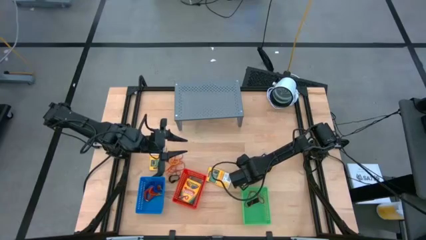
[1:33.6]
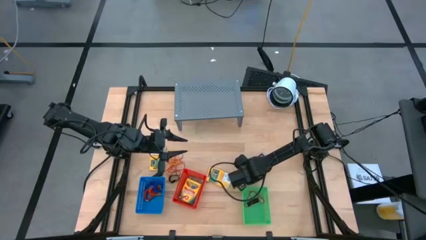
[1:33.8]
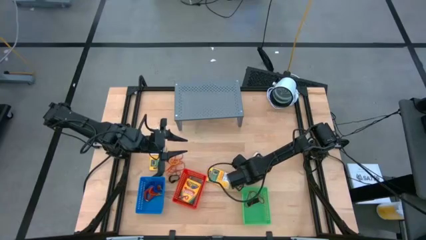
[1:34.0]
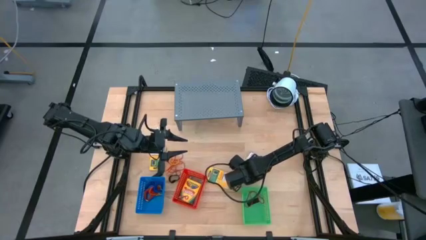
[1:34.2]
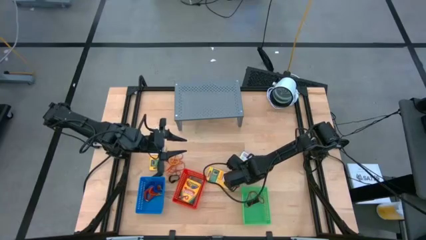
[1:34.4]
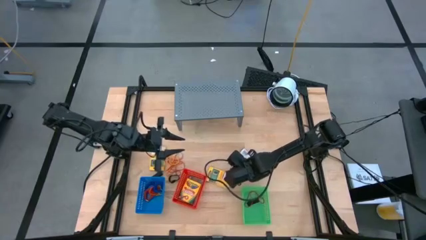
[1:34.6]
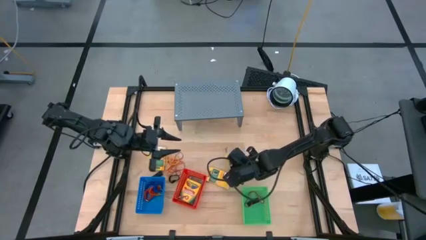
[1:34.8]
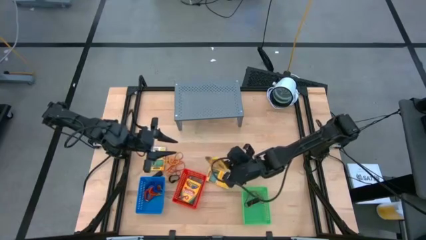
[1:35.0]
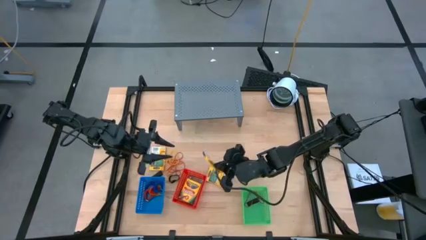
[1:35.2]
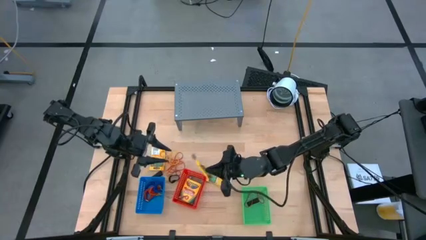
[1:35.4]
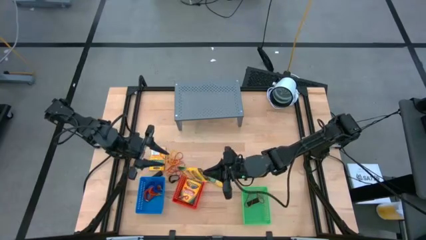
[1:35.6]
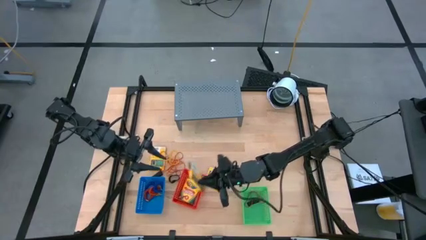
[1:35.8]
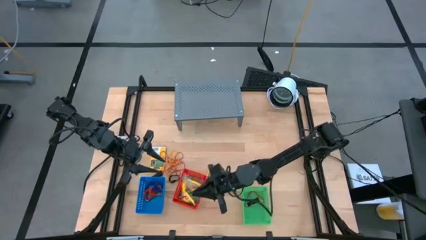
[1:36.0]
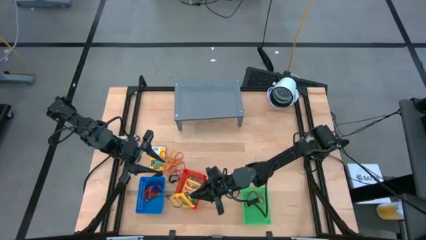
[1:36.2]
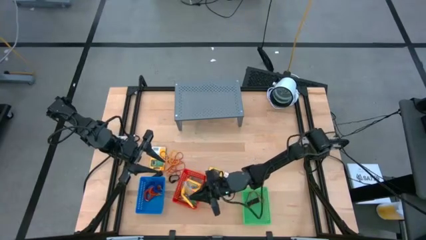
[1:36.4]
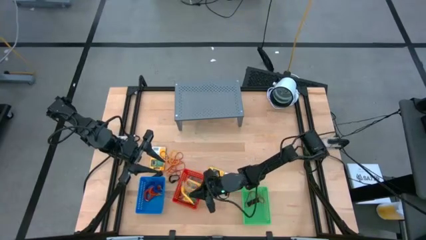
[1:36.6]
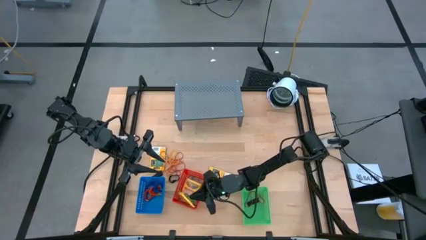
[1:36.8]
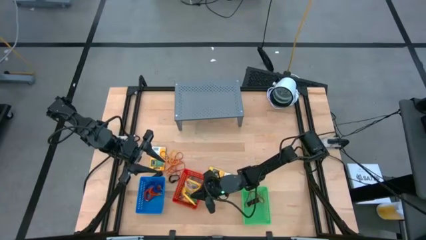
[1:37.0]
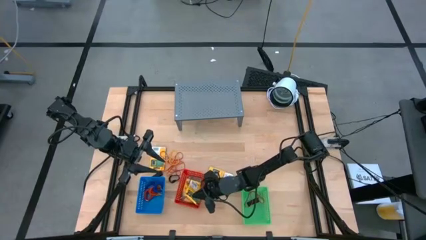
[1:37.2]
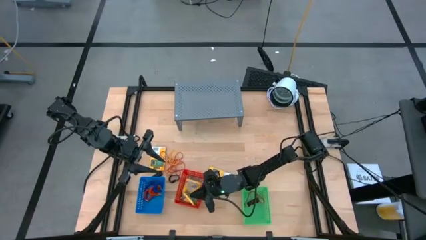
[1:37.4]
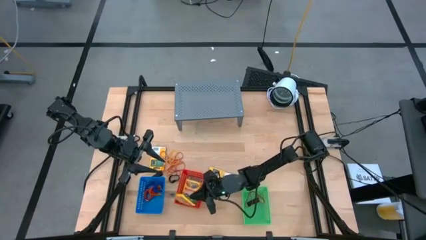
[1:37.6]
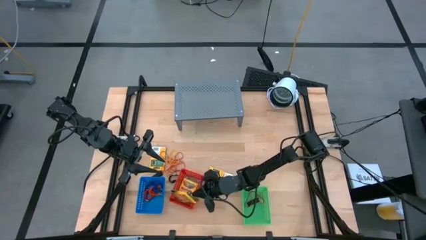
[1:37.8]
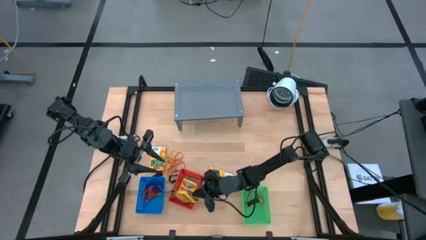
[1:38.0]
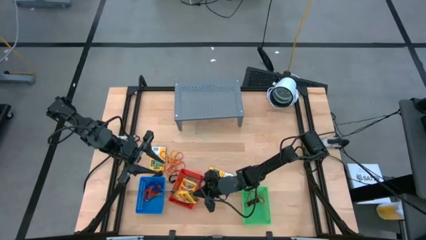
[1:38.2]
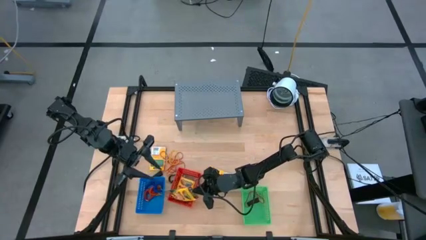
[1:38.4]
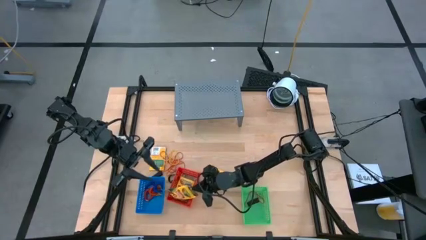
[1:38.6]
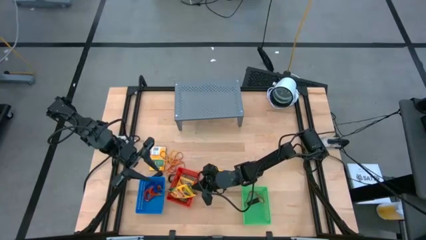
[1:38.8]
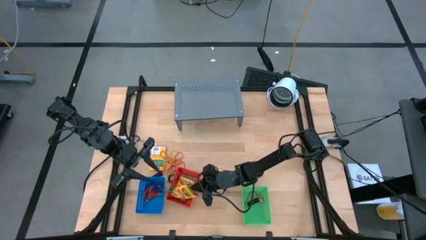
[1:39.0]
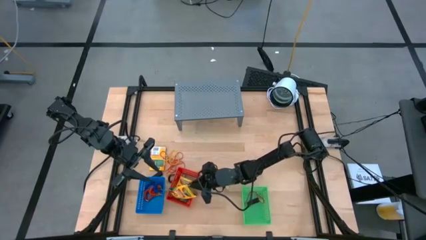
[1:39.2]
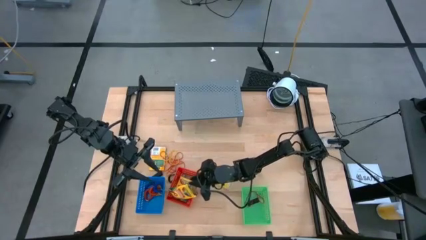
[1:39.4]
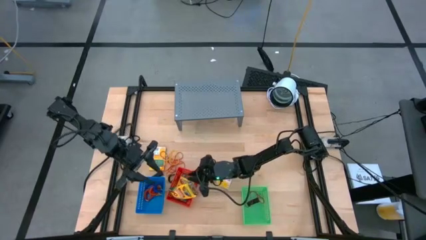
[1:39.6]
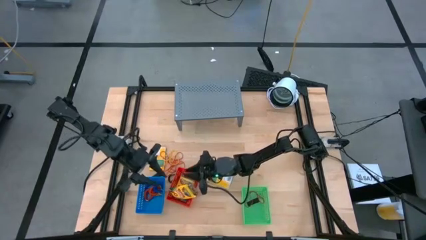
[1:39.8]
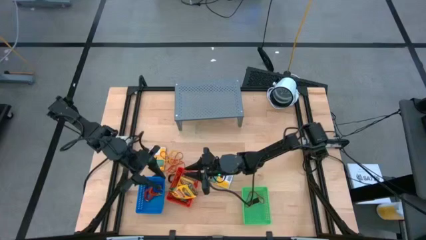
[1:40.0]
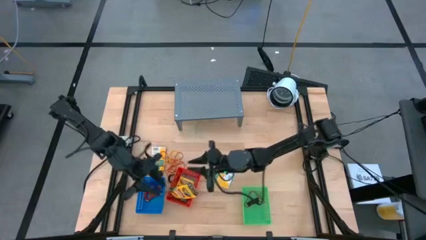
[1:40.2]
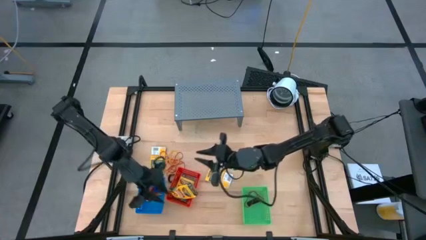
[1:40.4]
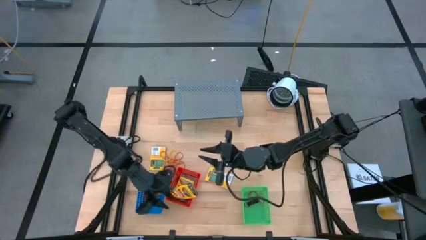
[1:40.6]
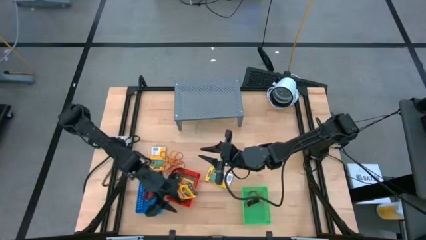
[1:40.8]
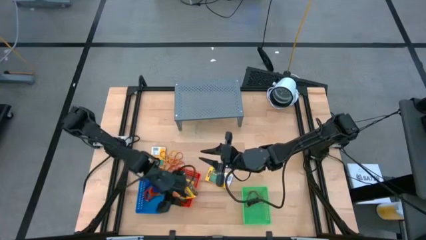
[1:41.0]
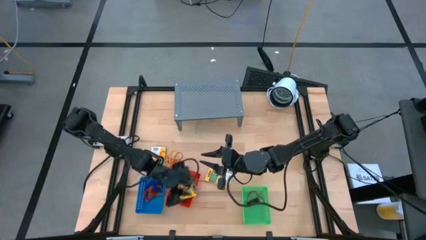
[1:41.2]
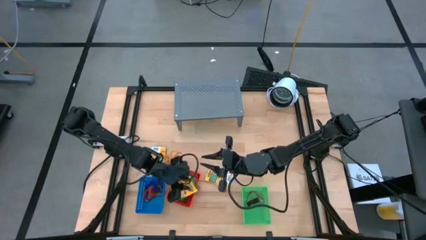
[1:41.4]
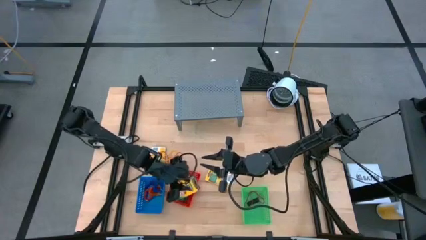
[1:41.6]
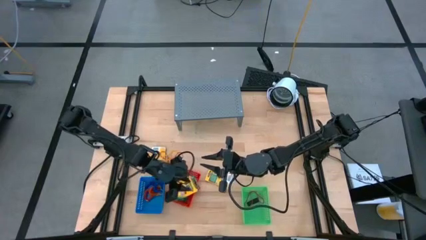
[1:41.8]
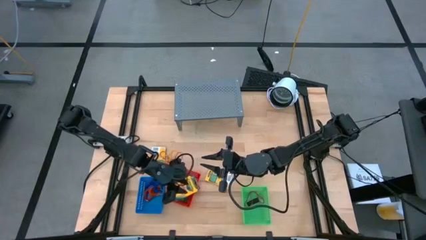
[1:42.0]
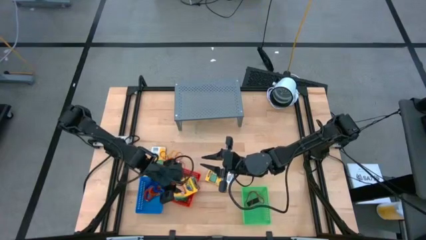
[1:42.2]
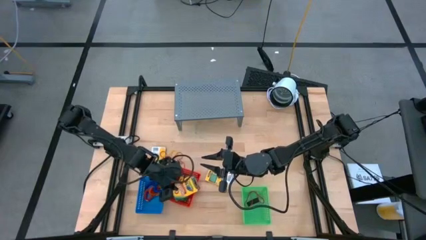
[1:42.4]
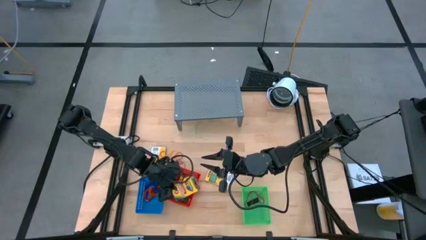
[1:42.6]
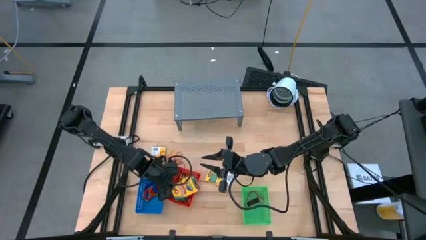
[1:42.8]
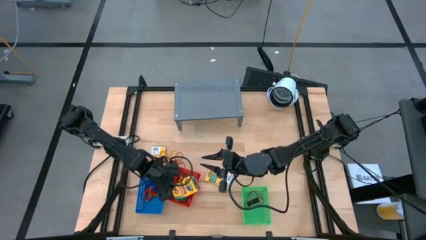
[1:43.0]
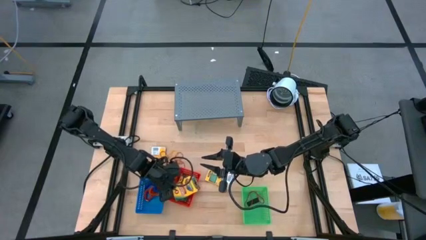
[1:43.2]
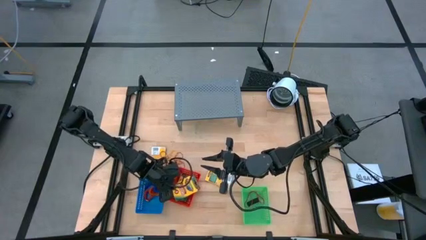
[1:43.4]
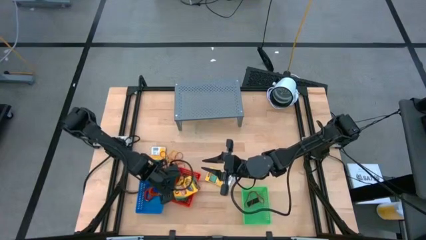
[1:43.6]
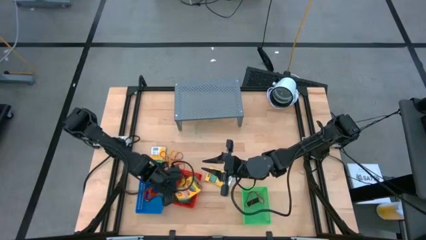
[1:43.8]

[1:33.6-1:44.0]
Task: Pick & Place Office Desk Supplies
Put the right yellow crayon box into the red basket

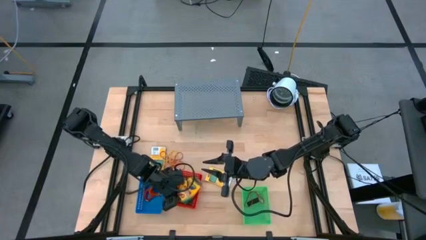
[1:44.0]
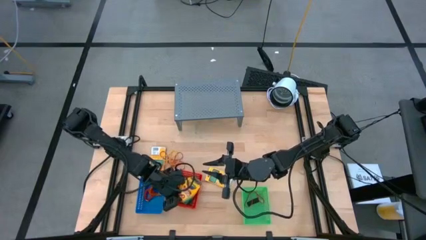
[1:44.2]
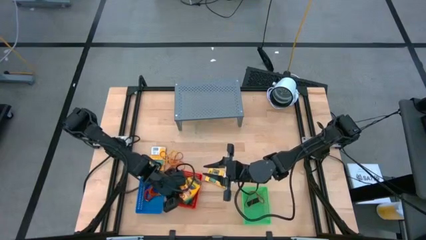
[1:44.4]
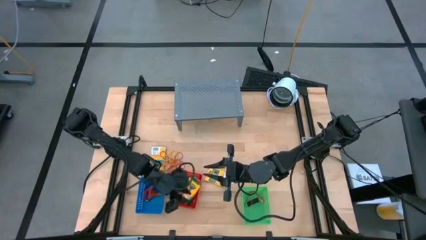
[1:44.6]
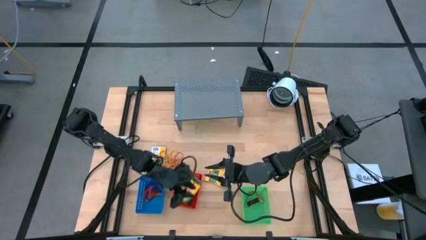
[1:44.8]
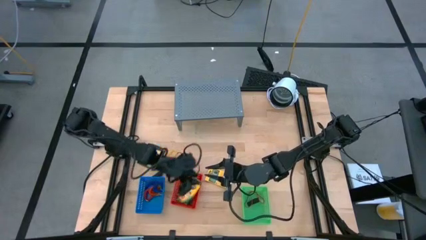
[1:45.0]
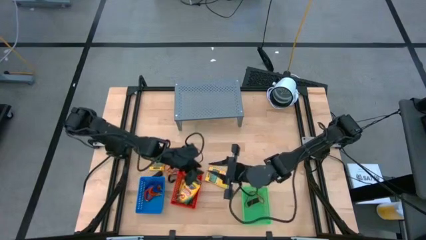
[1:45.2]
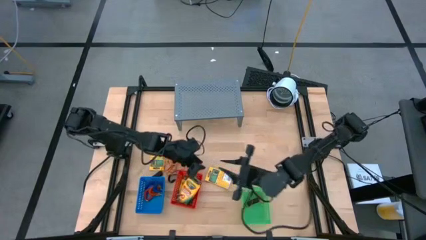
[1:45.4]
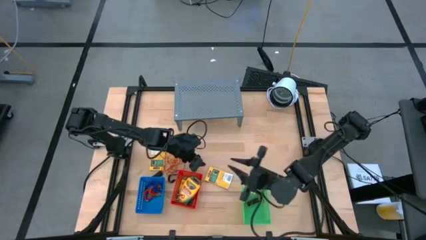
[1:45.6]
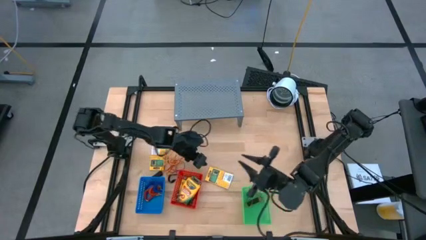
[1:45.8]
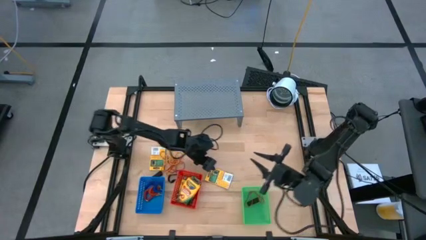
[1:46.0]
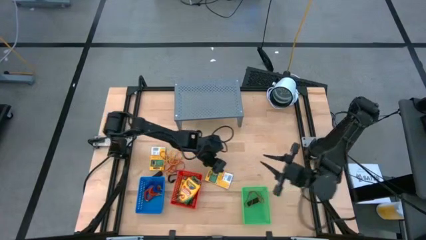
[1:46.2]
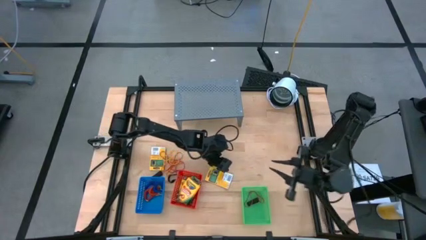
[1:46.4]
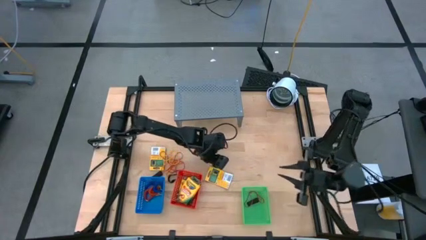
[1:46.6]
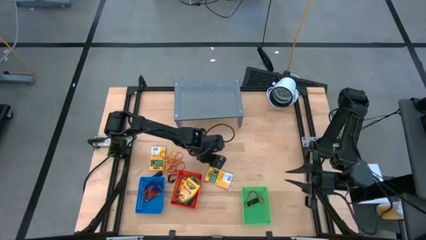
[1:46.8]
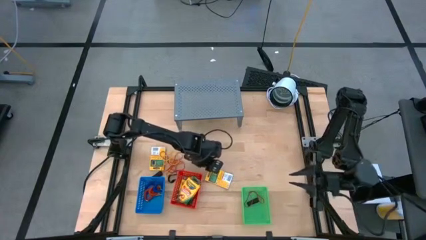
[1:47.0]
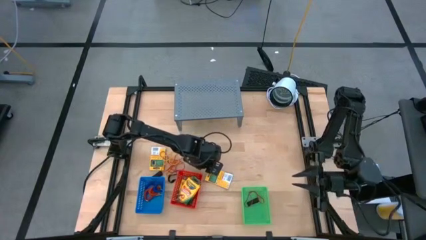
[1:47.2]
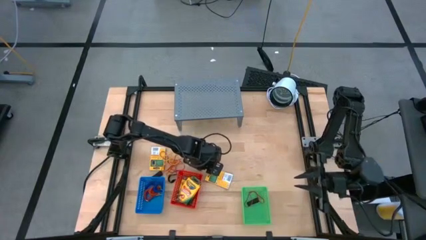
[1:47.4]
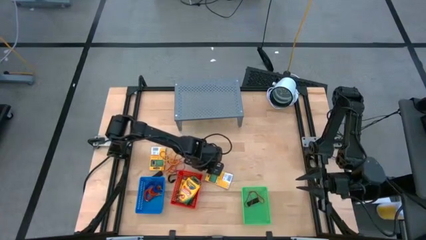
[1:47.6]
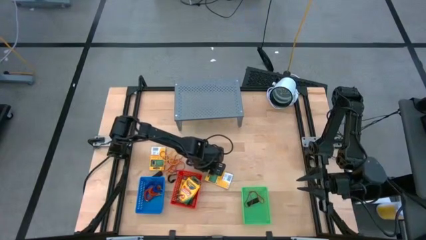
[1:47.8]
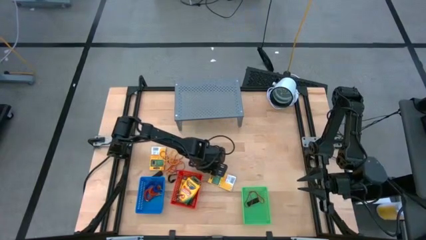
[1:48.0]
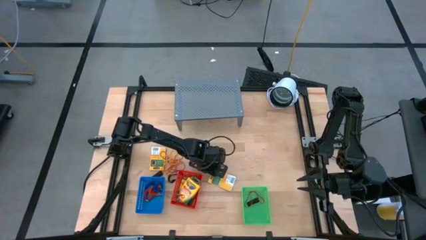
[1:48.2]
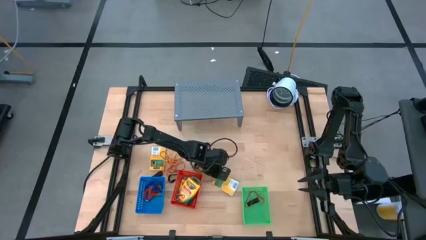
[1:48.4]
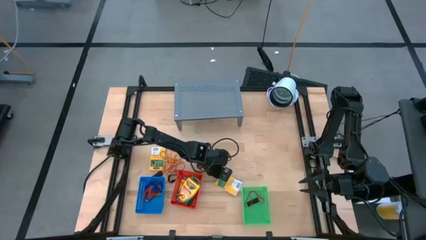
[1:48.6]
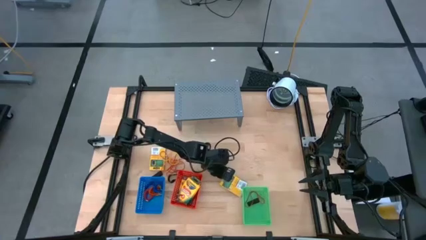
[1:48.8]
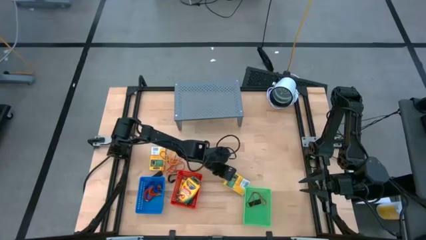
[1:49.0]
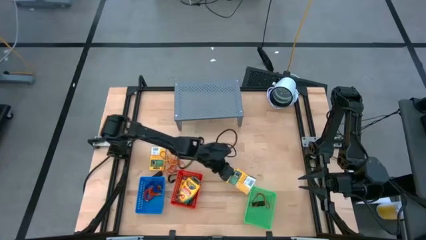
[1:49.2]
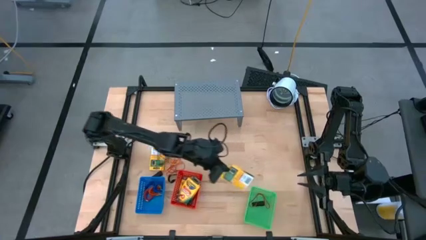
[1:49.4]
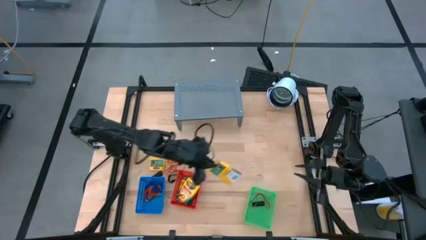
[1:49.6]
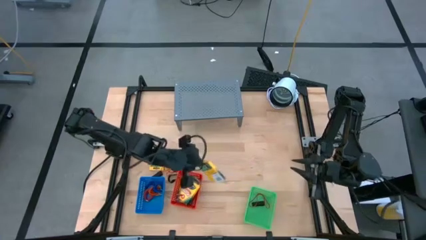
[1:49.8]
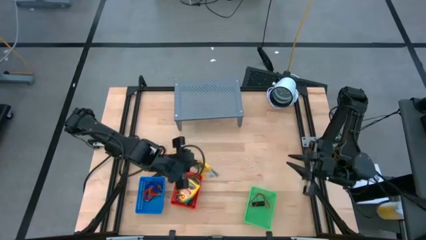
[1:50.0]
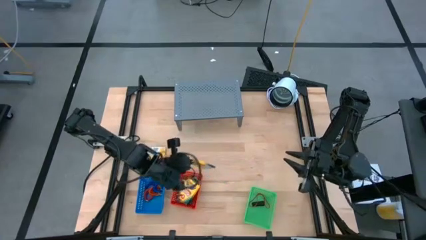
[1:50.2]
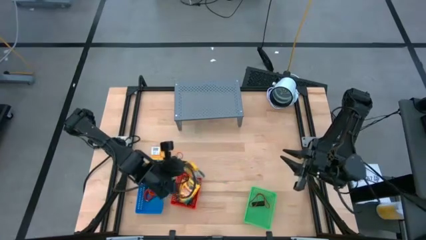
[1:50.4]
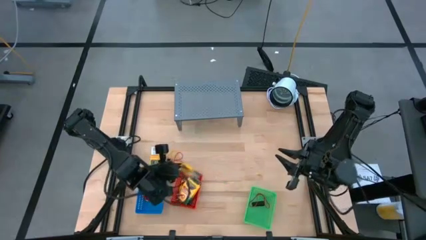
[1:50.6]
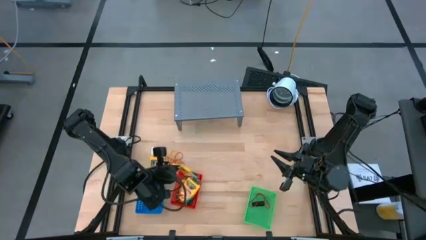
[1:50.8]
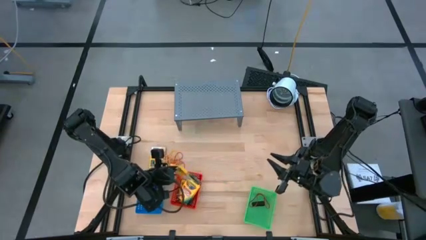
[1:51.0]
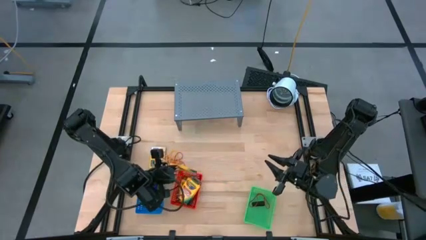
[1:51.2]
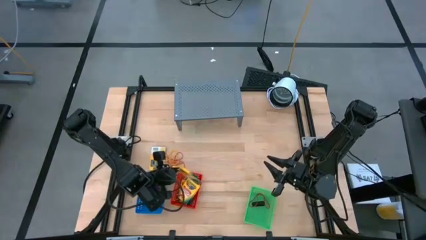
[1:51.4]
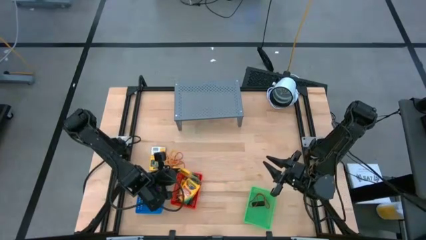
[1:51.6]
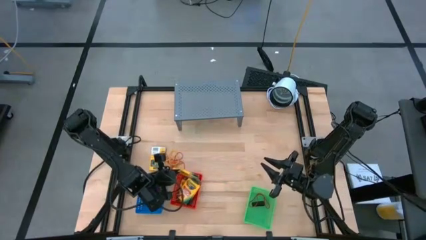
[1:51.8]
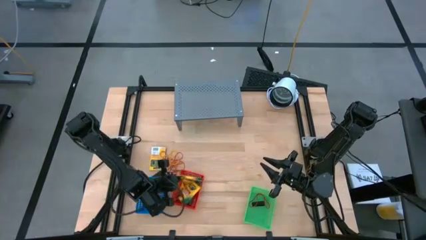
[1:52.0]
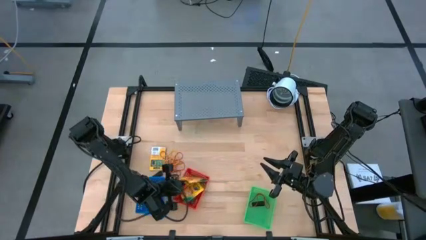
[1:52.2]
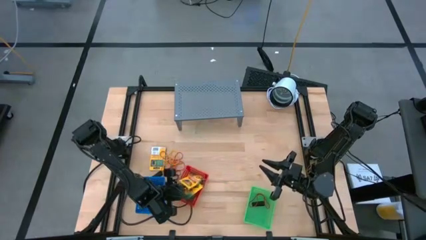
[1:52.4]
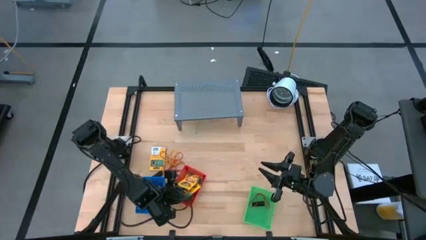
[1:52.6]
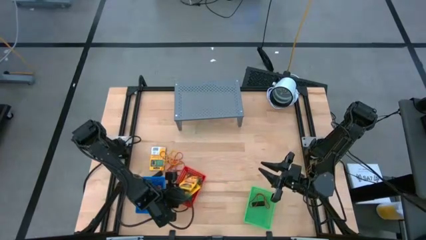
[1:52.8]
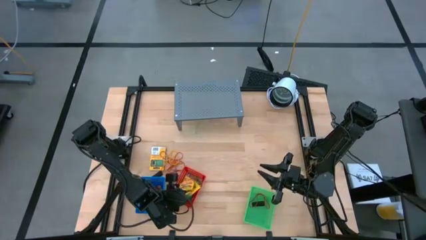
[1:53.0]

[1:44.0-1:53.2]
Put the right yellow crayon box into the red basket
